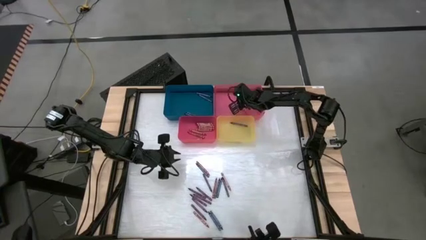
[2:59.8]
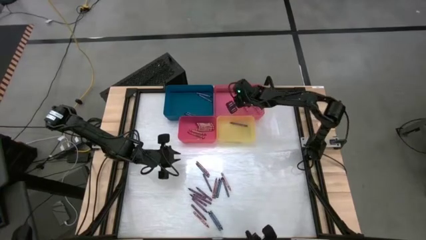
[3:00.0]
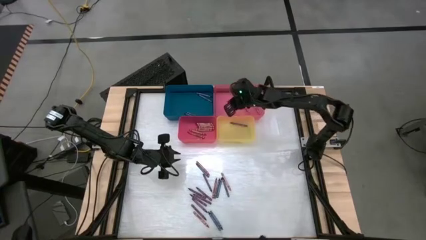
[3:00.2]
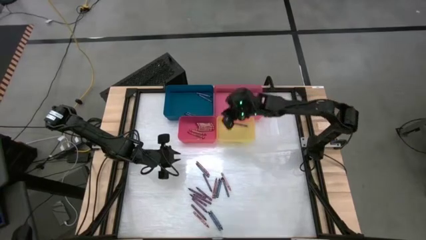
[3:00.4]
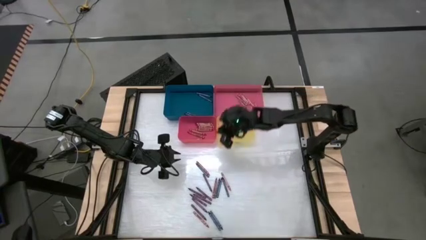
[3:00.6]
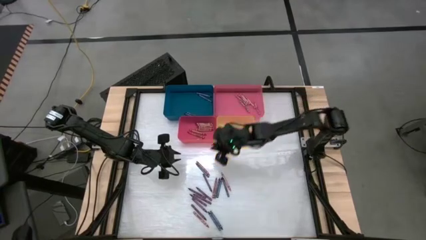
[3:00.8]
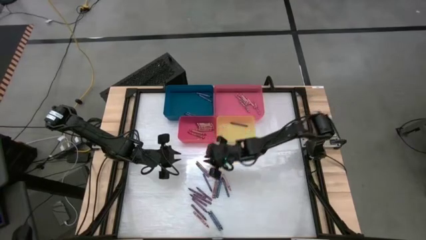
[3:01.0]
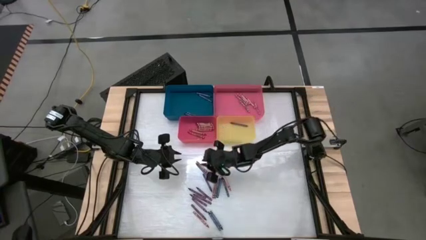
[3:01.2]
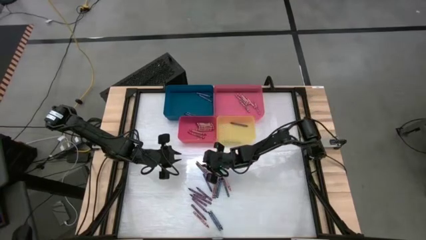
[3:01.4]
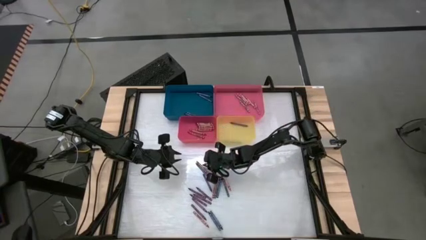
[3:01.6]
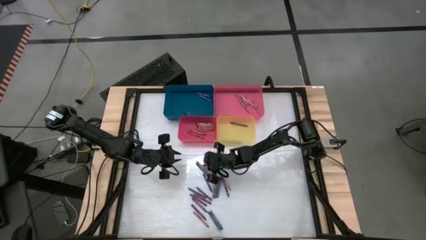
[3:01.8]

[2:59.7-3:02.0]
Task: Sort crayons
Put the blue crayon into the blue bin

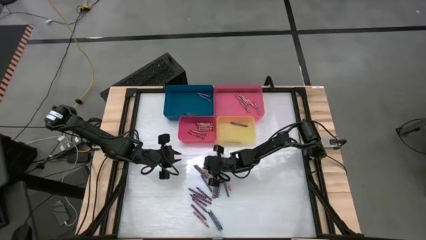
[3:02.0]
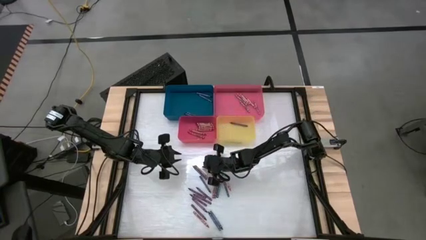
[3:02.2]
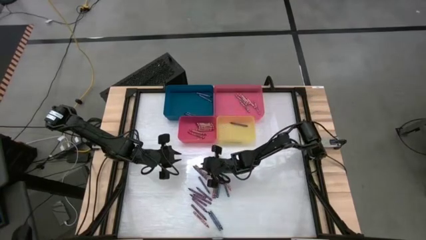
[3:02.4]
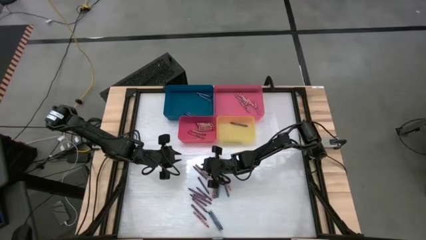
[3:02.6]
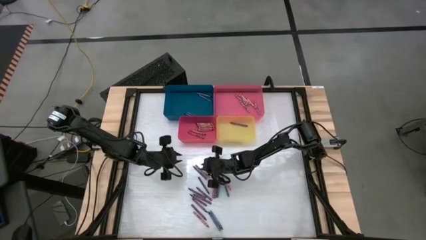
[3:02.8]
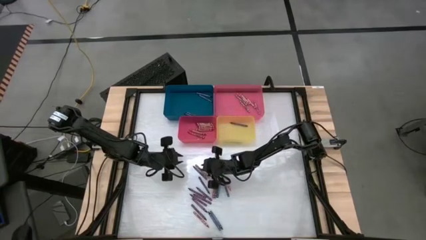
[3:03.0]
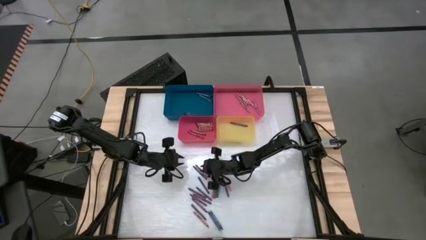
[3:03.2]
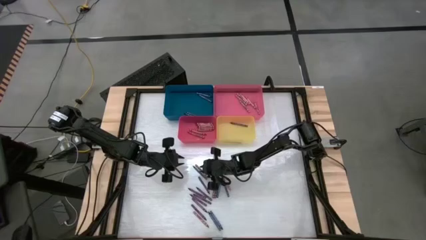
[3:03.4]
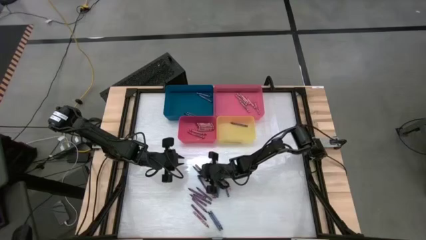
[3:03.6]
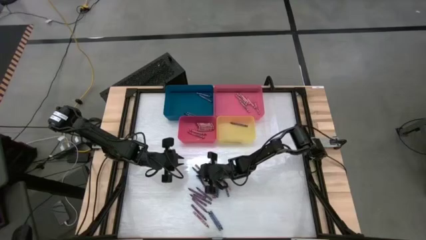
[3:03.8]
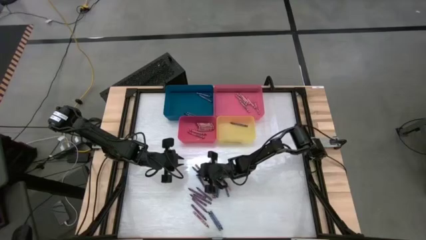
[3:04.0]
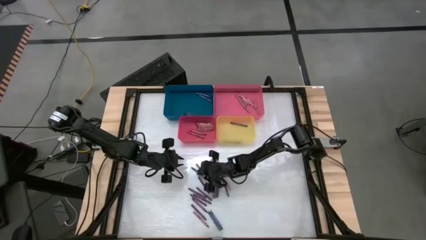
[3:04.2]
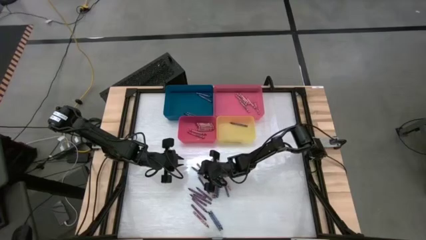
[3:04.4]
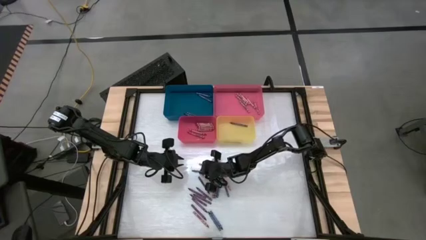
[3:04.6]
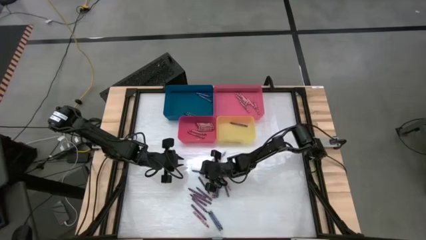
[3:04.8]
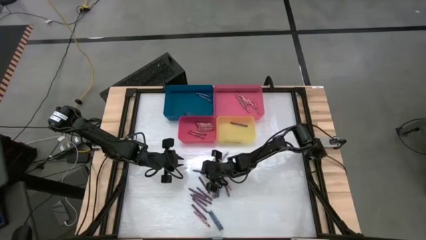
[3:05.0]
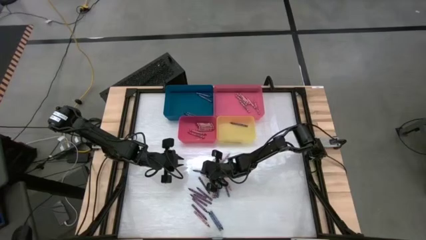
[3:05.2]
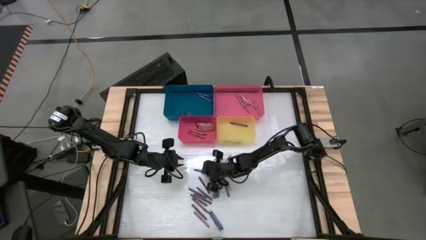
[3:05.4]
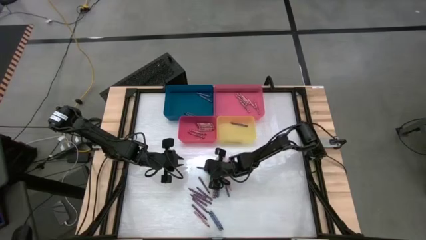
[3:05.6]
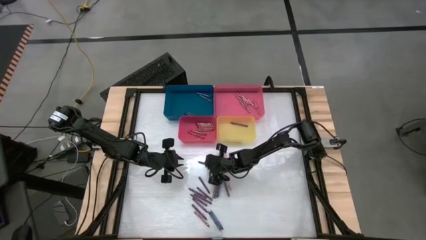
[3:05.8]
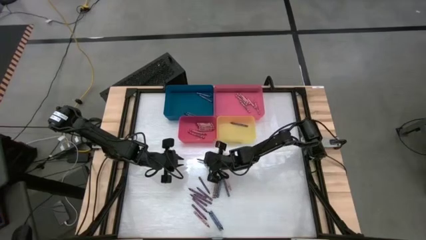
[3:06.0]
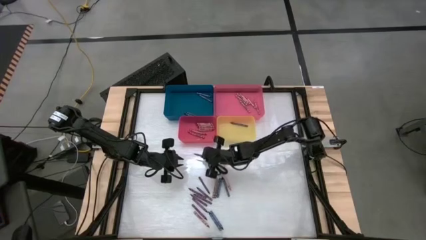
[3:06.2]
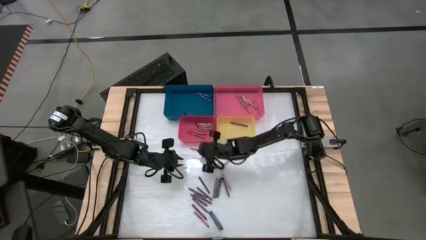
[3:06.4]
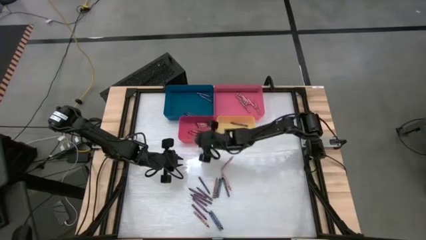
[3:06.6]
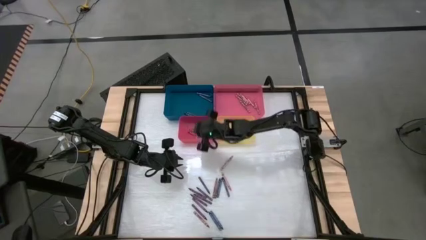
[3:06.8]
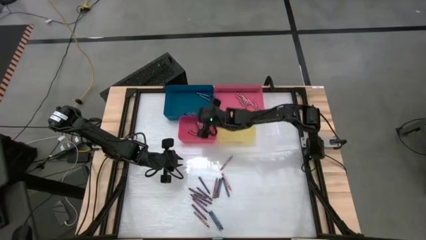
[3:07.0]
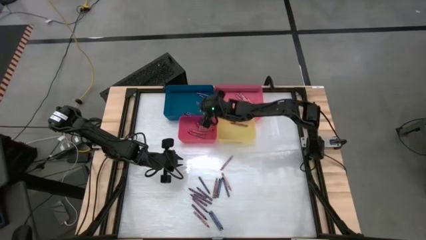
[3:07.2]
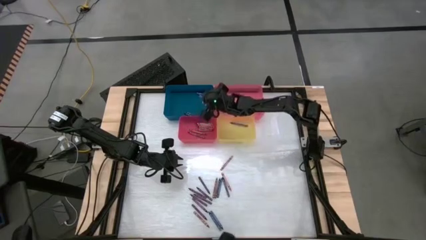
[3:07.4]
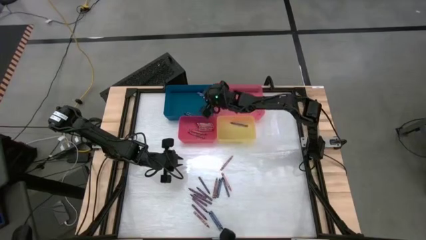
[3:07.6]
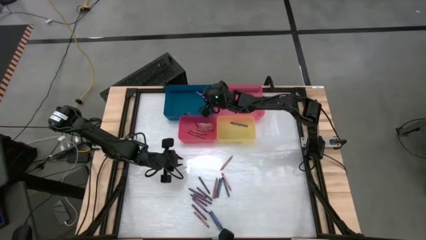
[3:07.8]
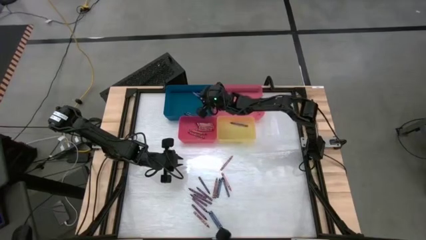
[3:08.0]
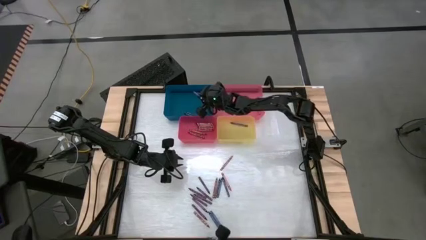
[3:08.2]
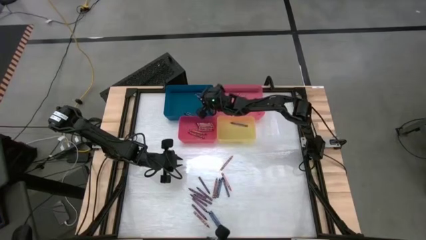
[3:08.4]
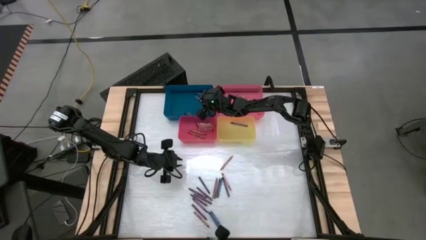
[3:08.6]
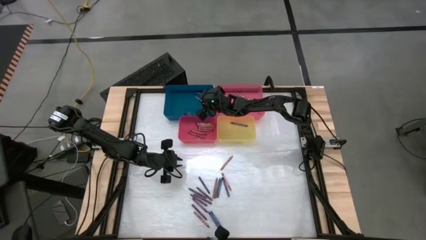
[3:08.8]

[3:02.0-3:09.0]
Put the blue crayon into the blue bin

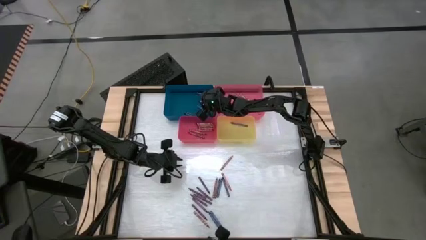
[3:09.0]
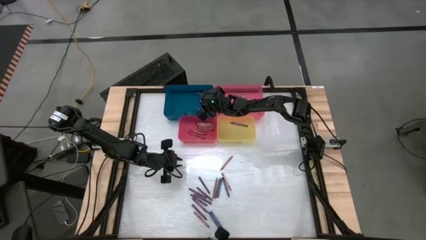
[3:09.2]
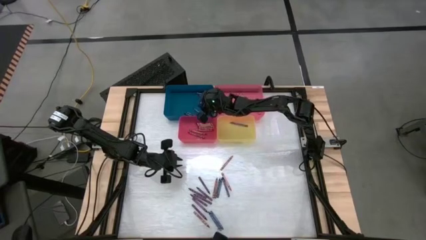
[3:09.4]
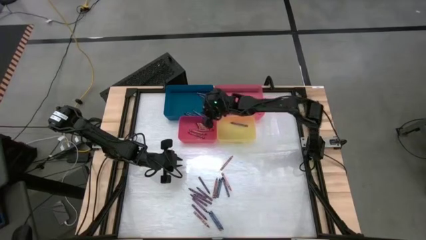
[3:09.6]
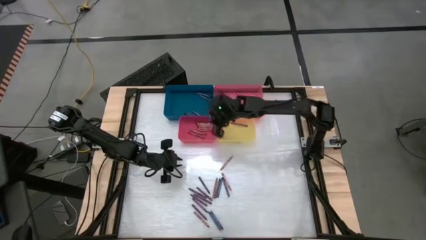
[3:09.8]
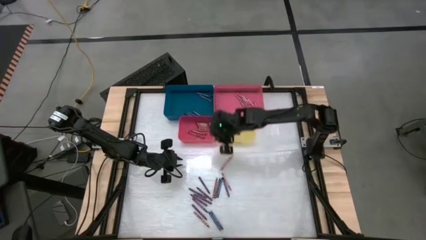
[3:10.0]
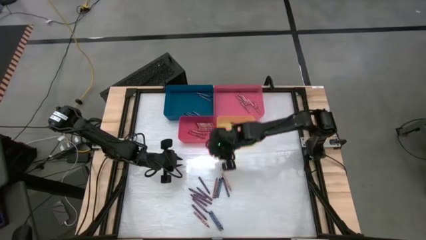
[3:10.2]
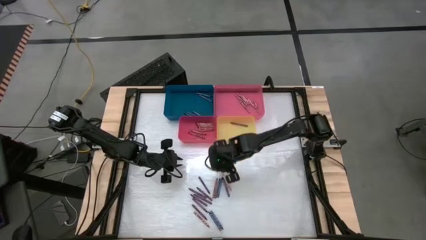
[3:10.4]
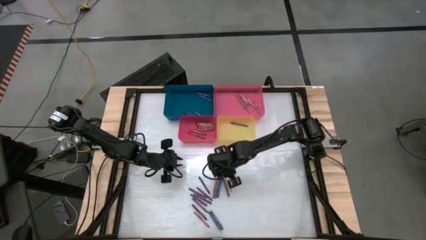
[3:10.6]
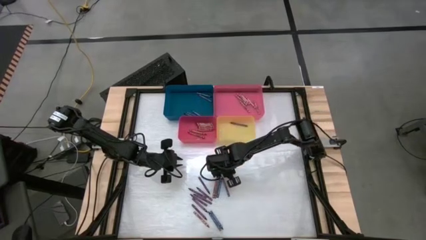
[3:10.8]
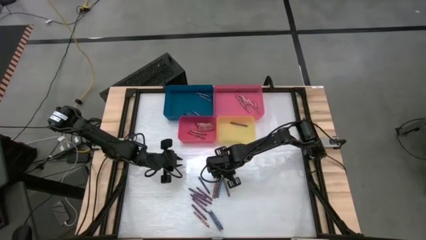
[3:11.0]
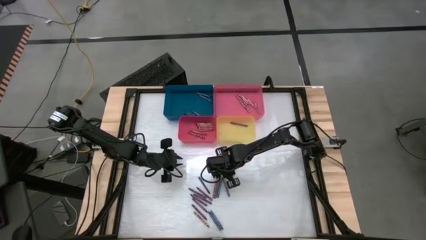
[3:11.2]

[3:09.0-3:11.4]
Put the pink crayon into the pink bin

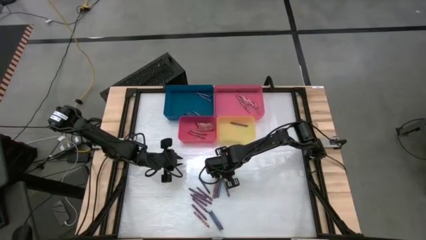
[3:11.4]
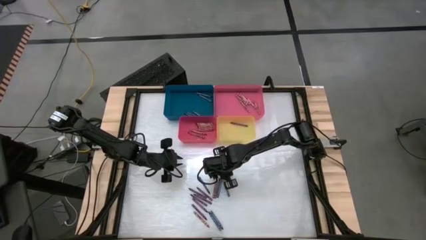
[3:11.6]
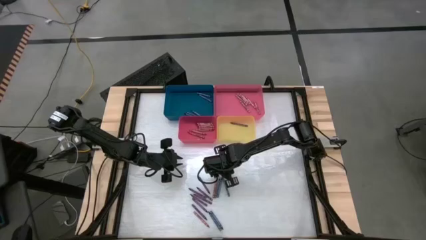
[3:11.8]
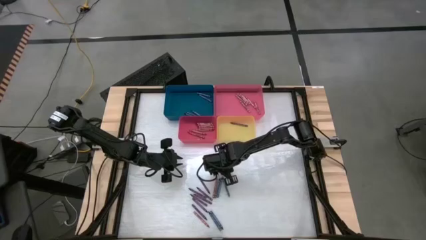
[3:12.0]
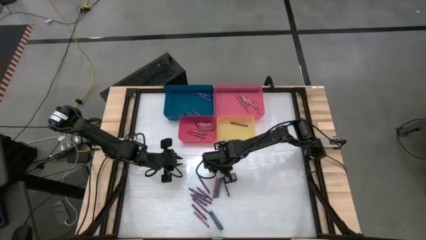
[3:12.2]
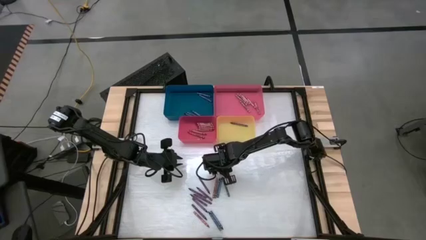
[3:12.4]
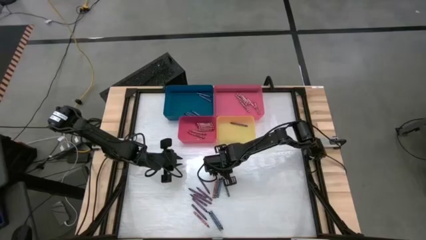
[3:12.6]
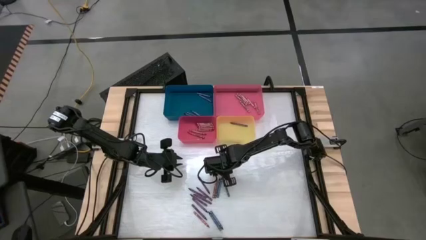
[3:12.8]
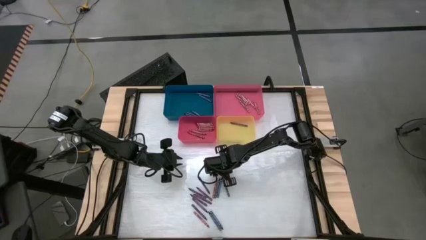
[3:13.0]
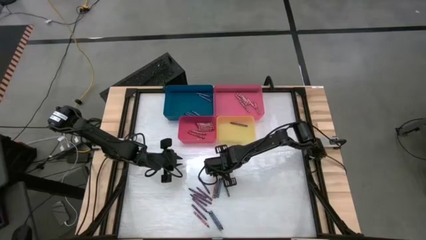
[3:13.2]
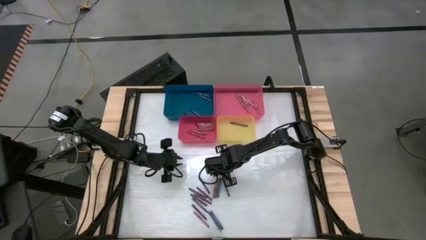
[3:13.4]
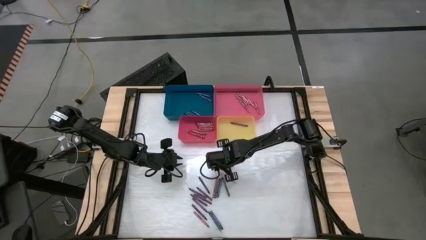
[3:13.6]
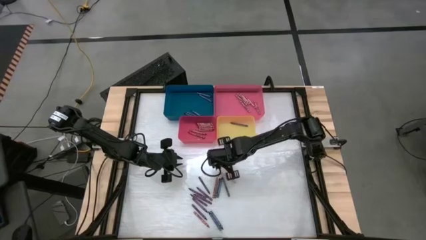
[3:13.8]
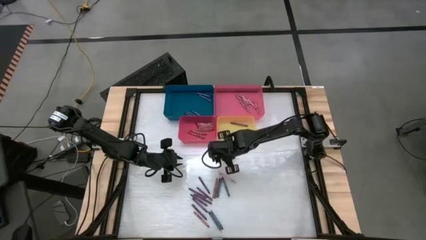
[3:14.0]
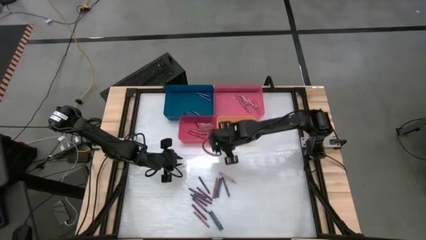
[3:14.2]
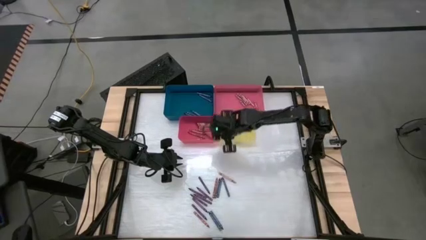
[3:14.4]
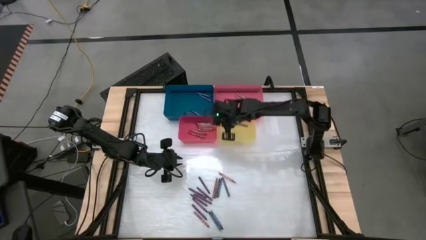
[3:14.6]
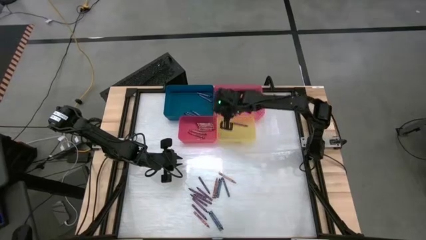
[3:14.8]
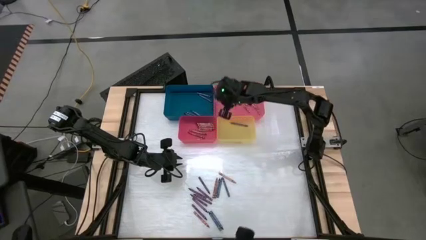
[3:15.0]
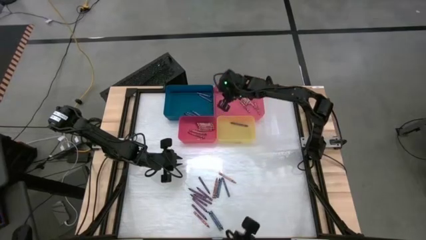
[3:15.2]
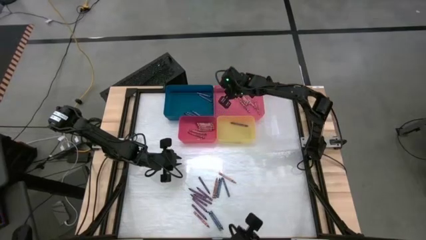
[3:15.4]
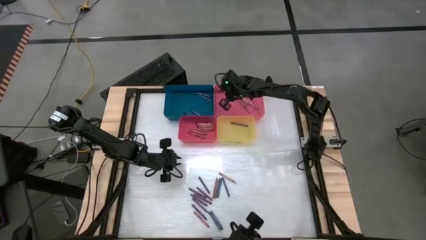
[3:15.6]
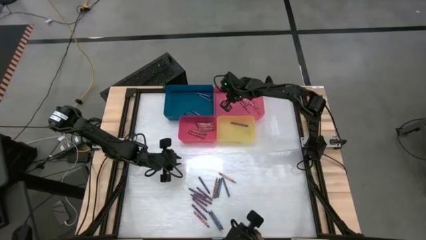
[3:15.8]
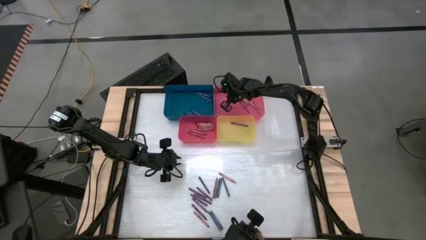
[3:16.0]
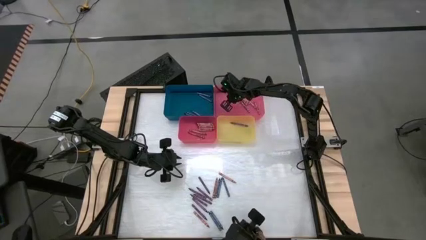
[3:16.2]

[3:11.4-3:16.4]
Put the pink crayon into the pink bin
